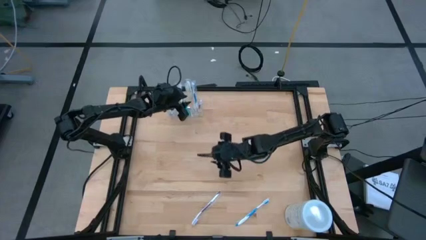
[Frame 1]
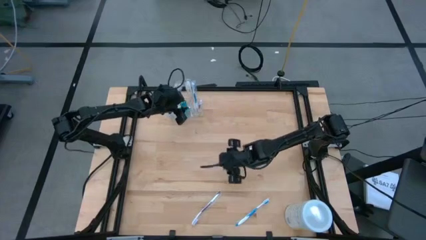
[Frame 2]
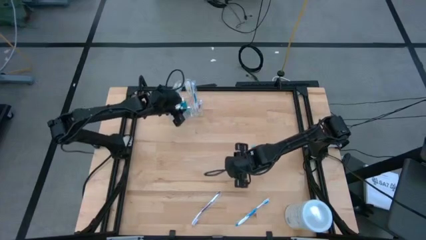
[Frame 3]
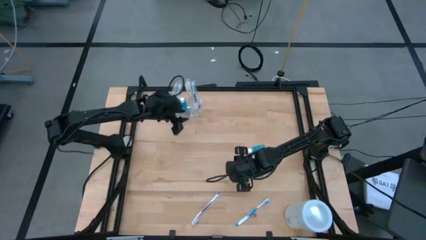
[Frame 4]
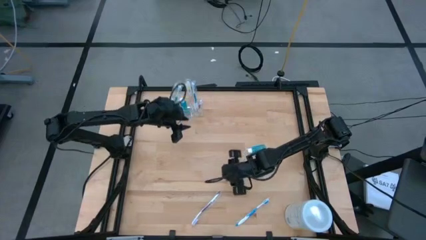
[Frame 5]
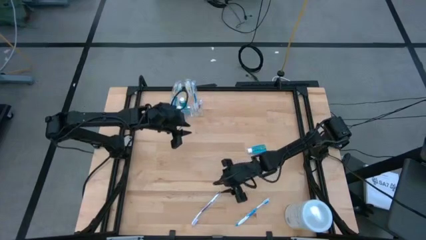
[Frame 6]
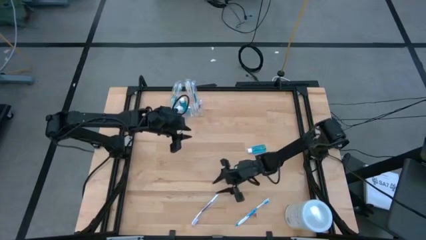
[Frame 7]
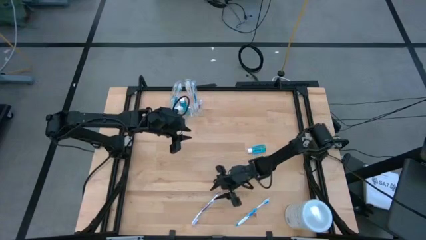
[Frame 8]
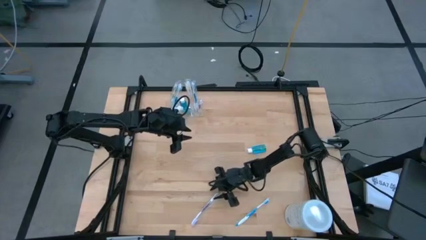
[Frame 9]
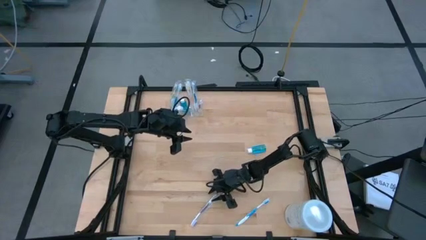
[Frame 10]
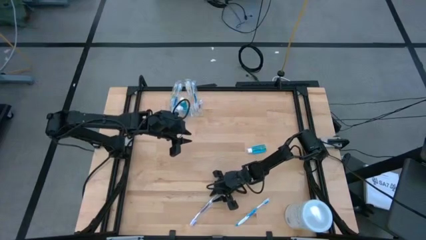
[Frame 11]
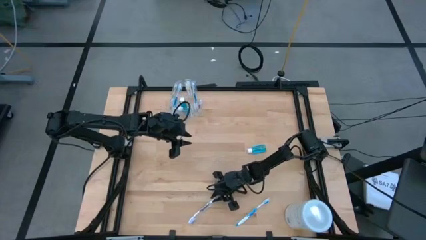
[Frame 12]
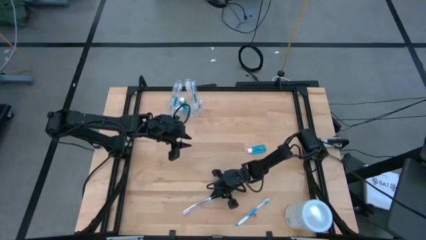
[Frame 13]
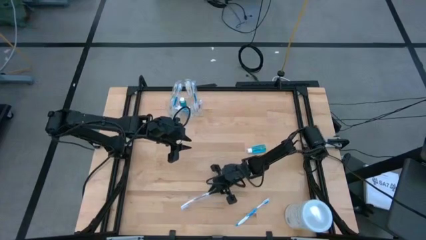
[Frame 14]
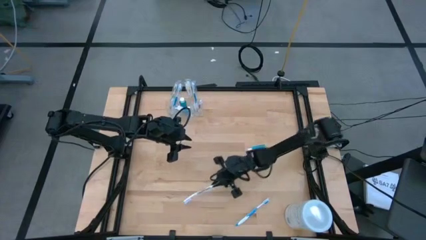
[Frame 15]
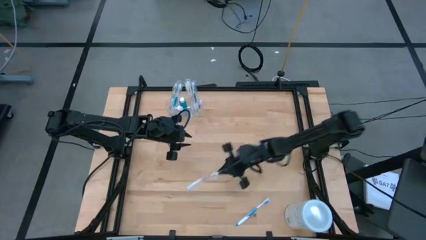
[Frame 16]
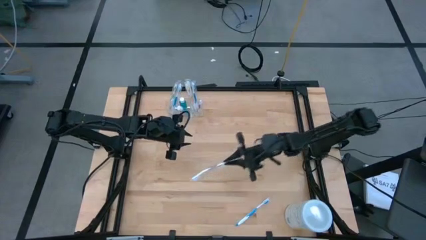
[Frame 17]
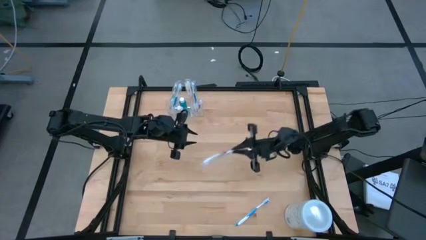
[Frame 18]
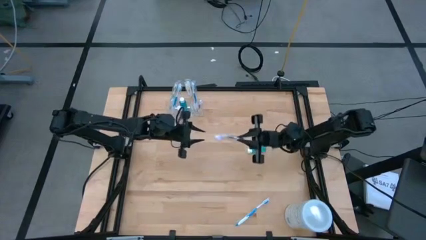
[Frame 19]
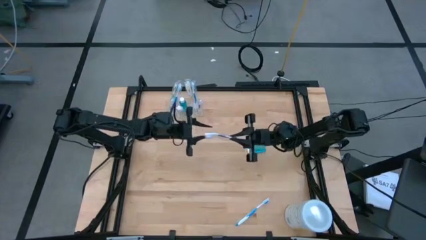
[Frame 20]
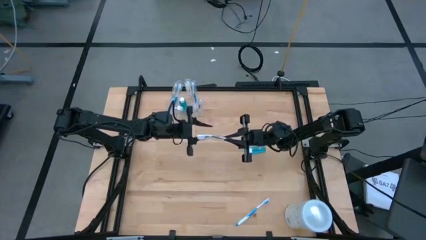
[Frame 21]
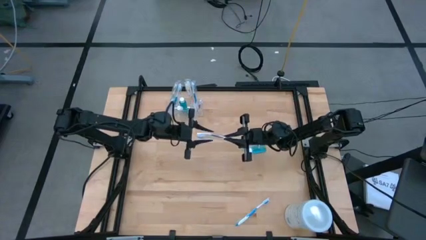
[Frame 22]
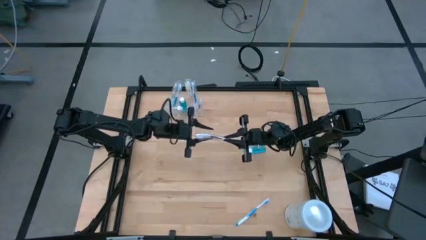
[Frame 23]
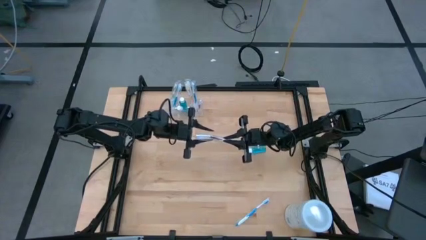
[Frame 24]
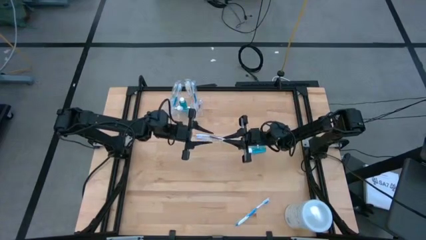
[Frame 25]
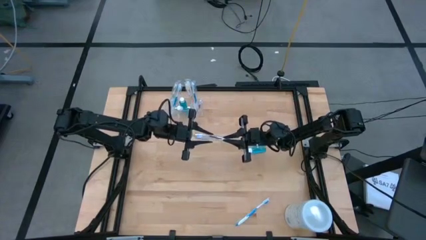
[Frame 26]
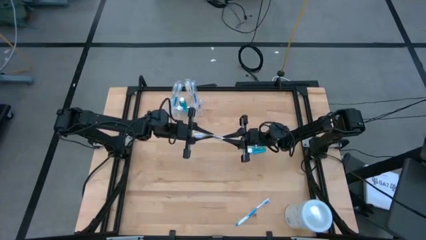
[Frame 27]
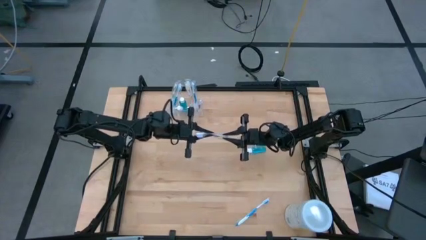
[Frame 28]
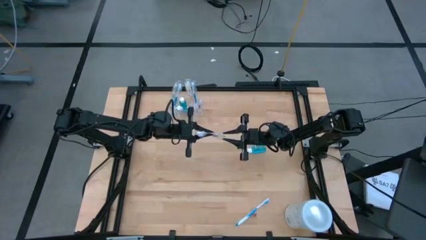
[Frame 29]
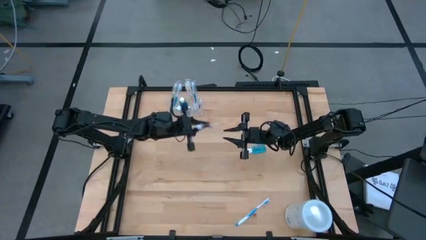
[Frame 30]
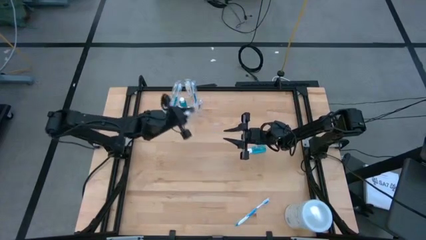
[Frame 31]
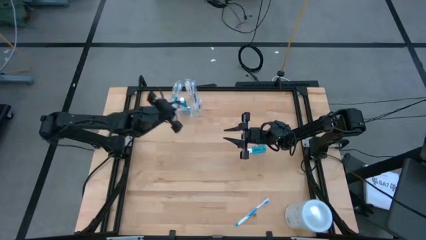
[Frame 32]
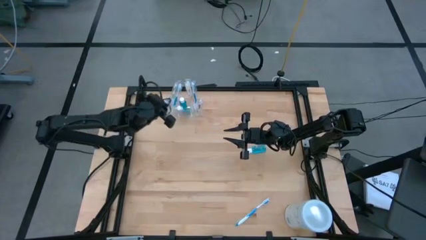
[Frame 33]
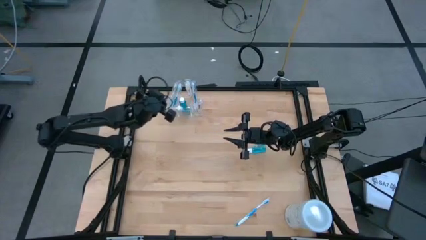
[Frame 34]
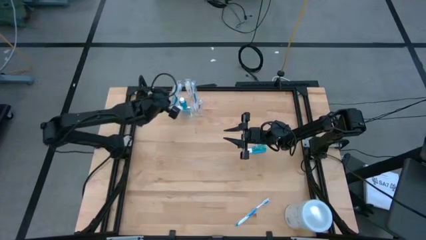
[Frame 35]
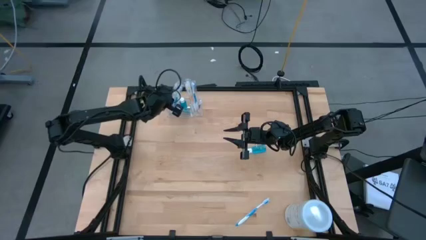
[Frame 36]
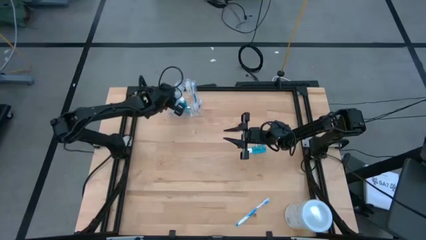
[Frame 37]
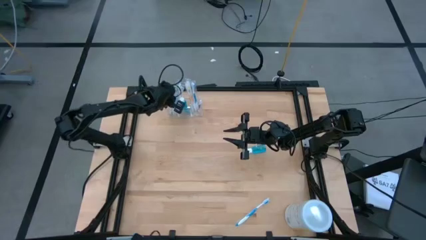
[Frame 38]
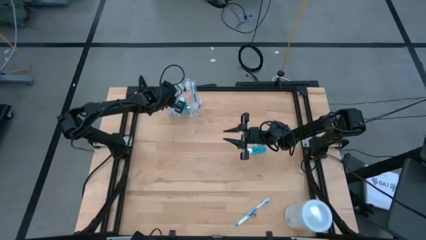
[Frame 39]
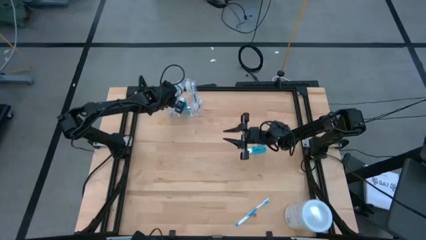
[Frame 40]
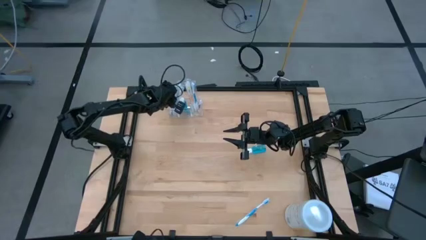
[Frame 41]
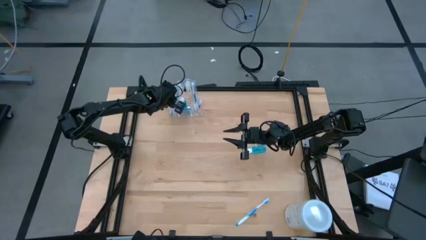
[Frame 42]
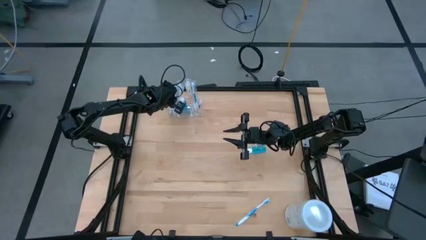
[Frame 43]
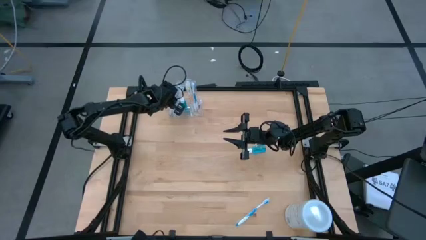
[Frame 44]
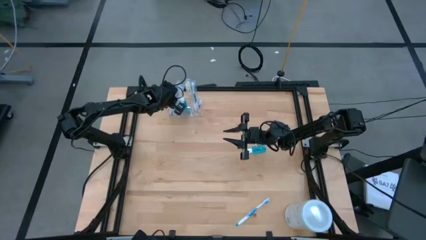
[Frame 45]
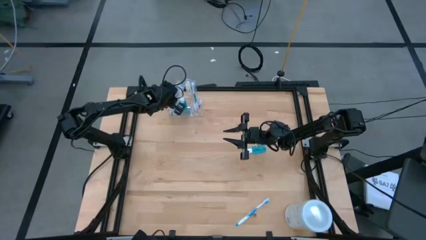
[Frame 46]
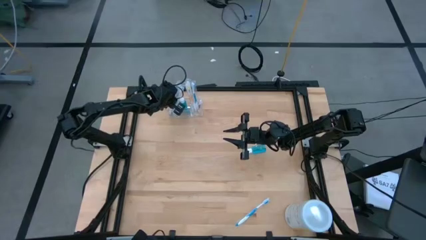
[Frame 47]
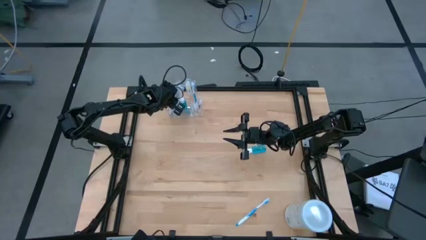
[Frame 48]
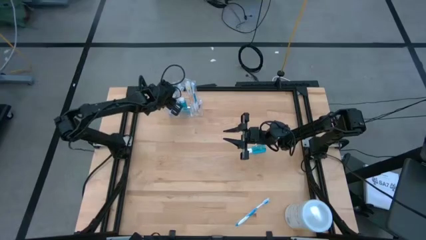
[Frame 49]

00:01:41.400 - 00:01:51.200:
Task: Pick & Place toothbrushing station
Put the violet toothbrush into the transparent organizer

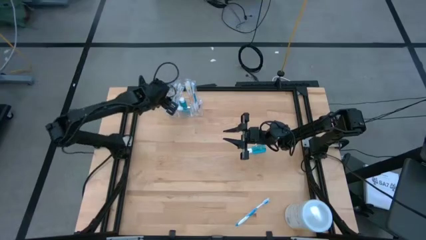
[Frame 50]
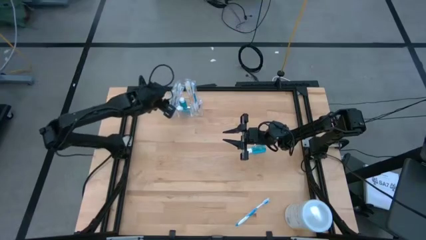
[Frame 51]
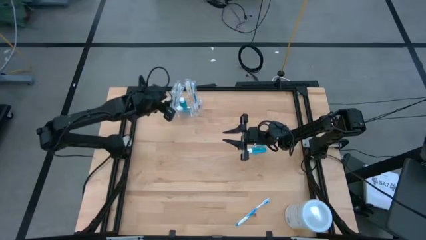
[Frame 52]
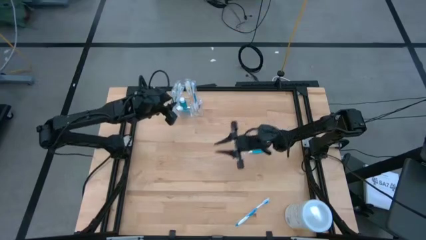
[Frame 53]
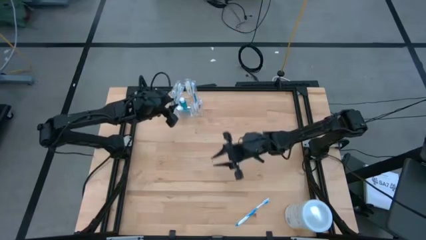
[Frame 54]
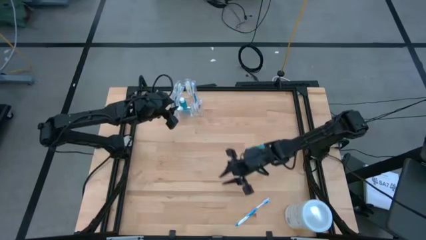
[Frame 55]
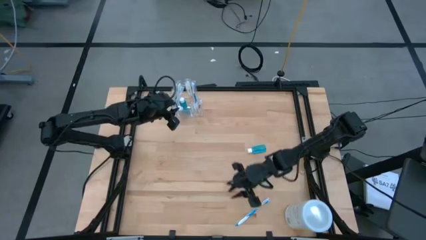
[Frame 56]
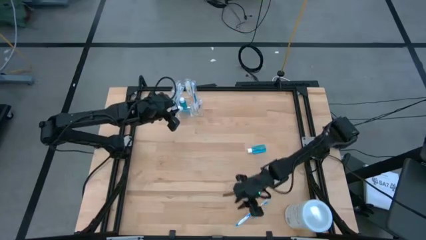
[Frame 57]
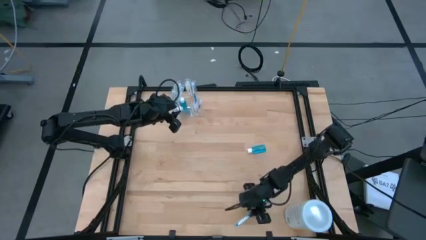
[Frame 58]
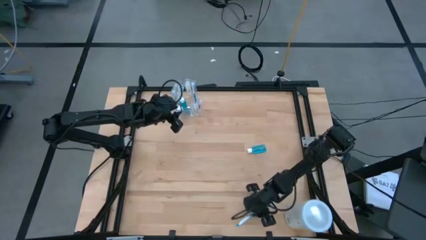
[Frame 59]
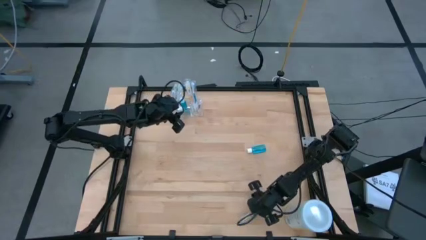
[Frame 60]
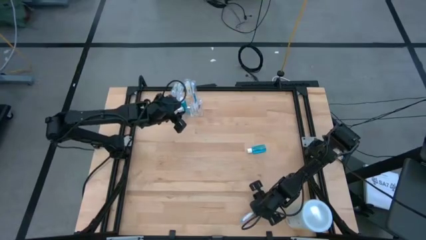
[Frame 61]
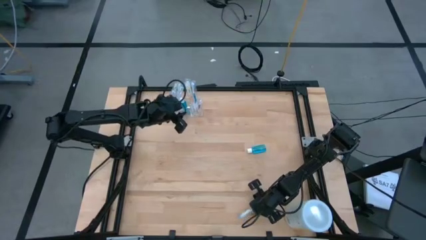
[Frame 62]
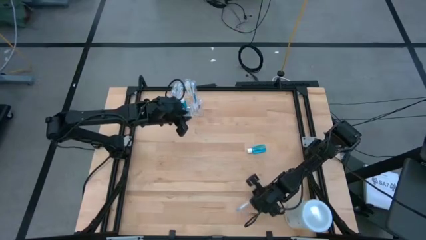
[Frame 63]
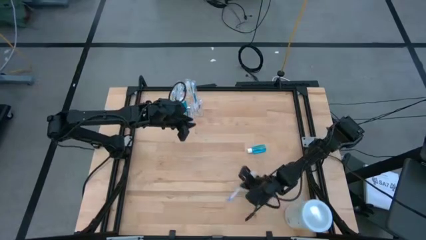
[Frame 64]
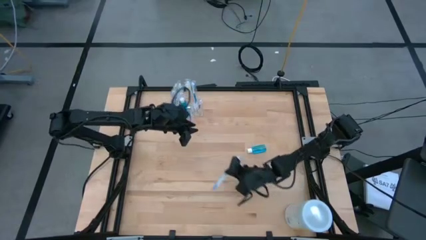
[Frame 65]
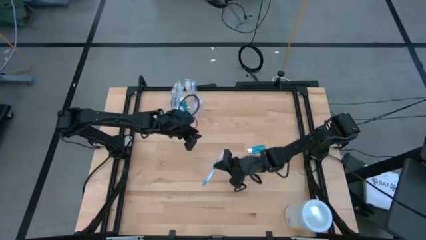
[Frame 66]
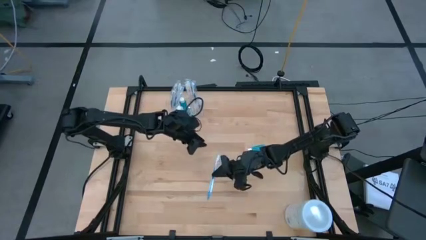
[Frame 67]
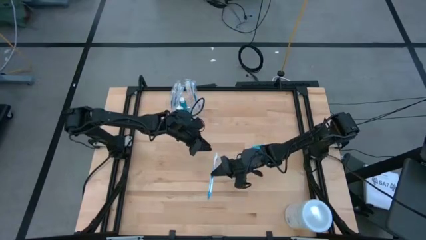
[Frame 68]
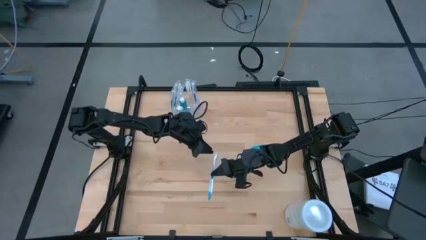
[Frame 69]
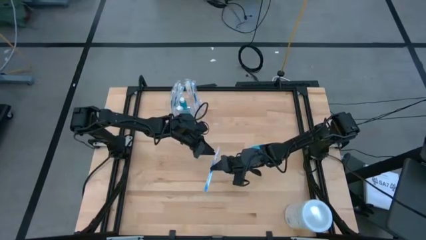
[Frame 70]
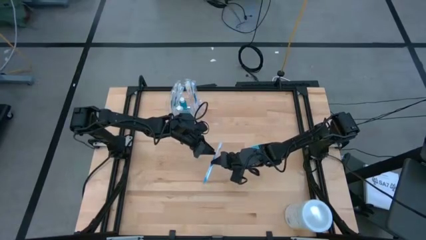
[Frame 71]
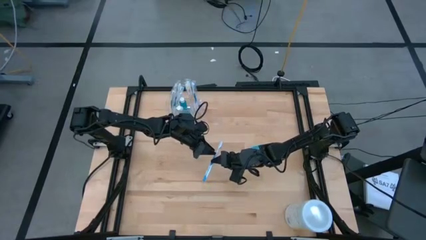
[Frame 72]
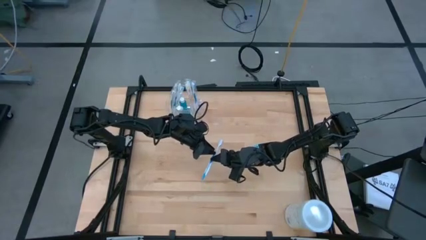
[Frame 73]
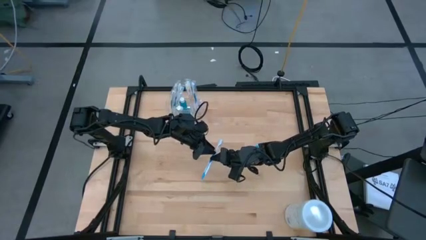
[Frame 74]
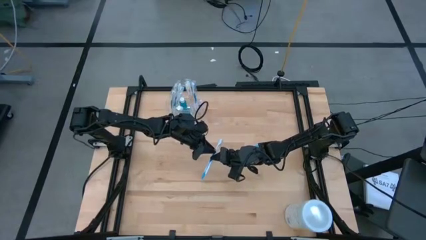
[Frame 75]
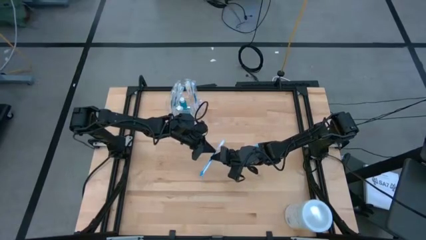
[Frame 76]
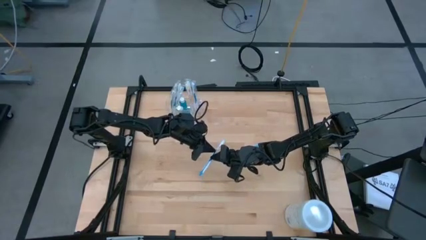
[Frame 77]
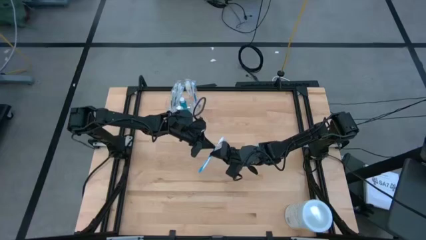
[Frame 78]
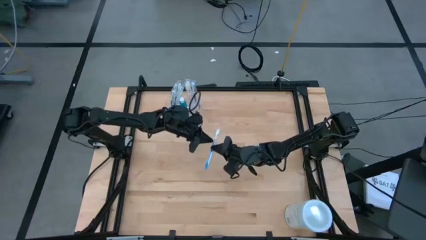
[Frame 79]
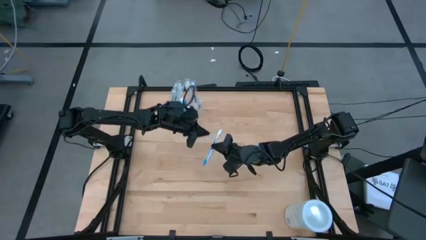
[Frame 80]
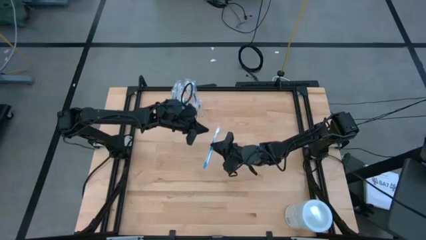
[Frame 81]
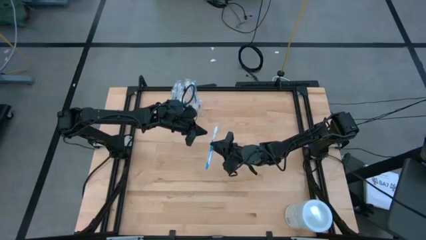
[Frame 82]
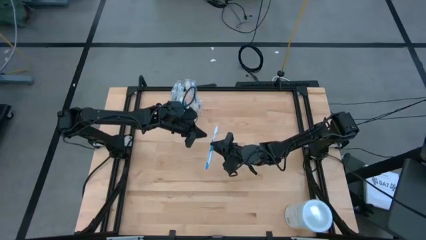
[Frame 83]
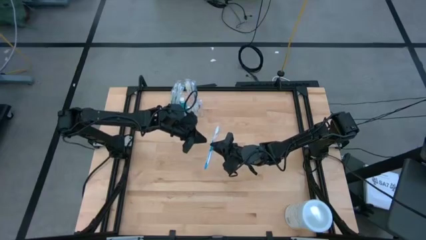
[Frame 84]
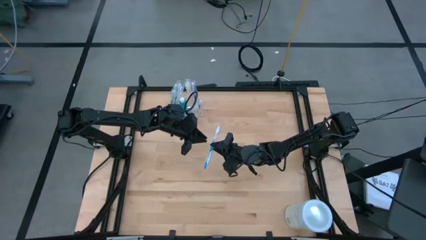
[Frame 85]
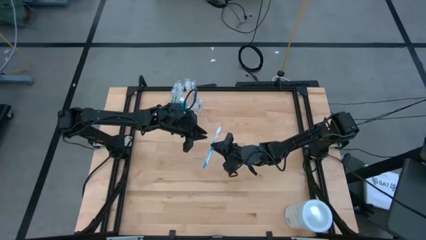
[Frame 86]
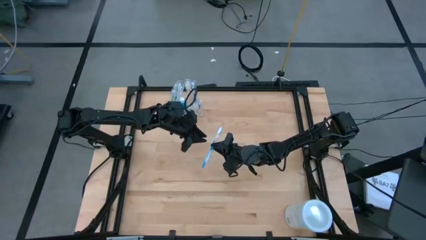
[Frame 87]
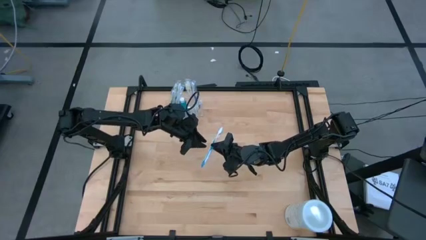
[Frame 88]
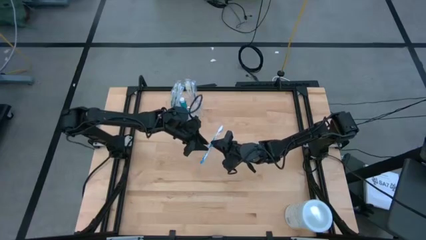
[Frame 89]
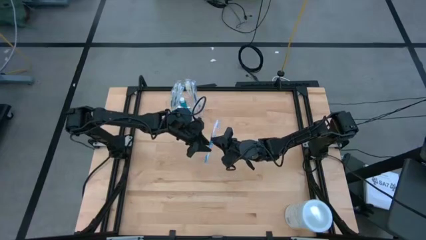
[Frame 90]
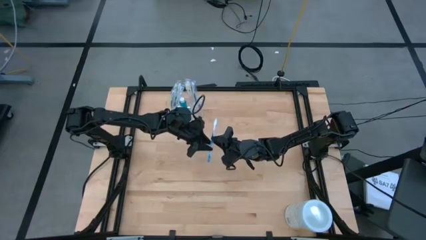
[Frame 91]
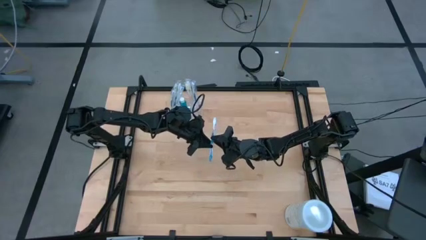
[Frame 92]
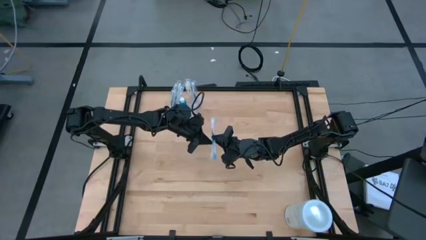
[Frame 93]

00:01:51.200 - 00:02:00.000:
Put the blue toothbrush into the transparent organizer
